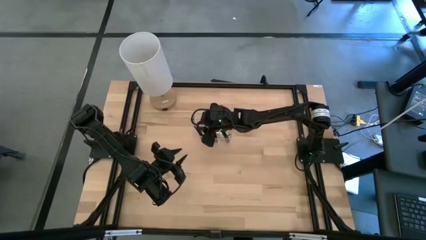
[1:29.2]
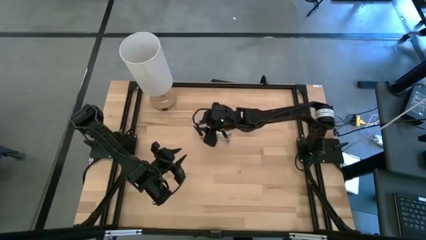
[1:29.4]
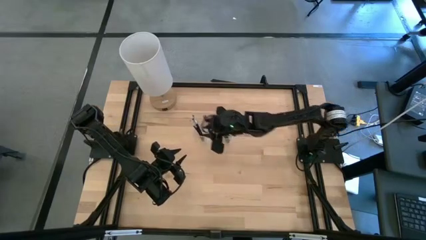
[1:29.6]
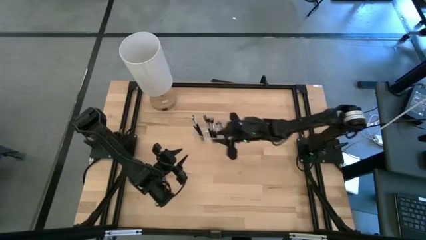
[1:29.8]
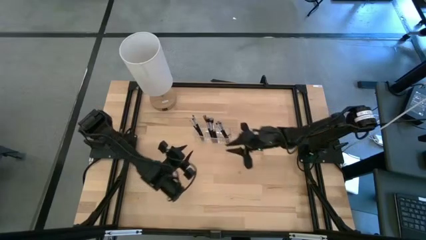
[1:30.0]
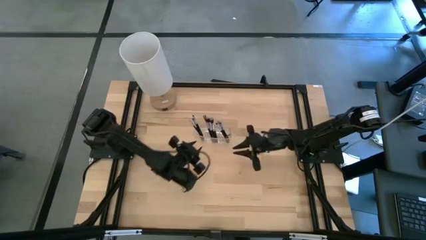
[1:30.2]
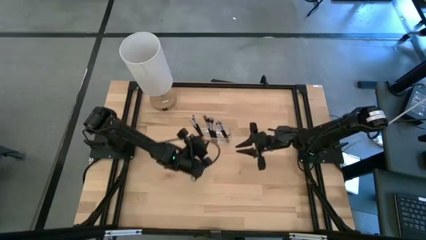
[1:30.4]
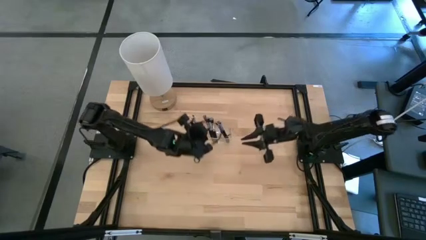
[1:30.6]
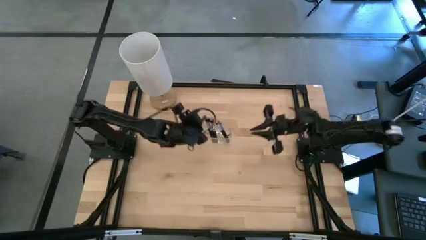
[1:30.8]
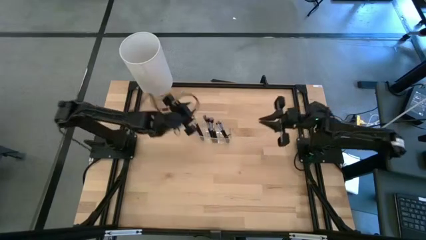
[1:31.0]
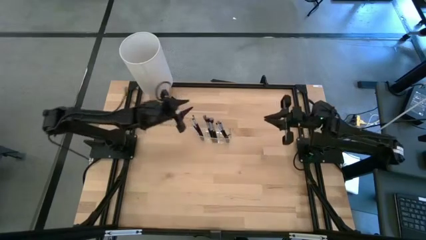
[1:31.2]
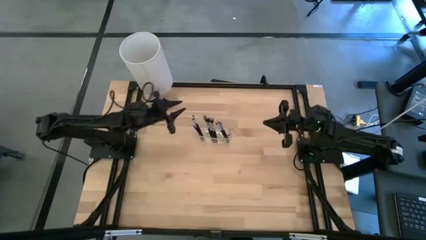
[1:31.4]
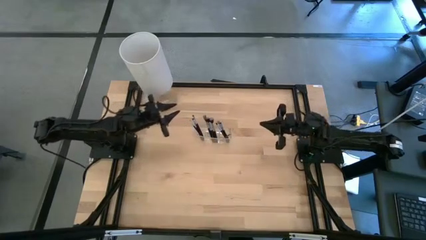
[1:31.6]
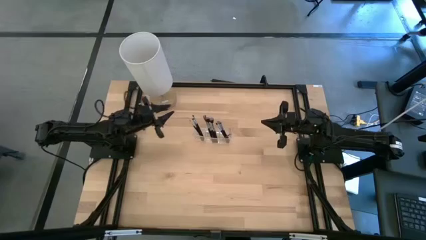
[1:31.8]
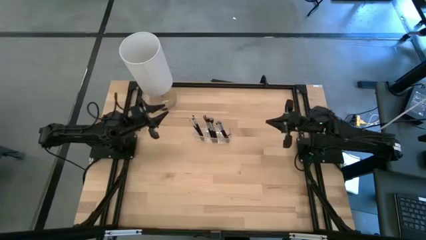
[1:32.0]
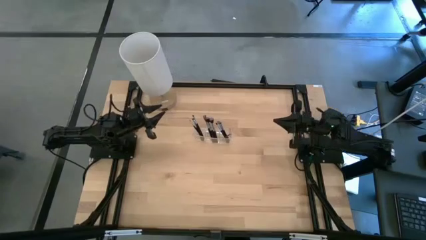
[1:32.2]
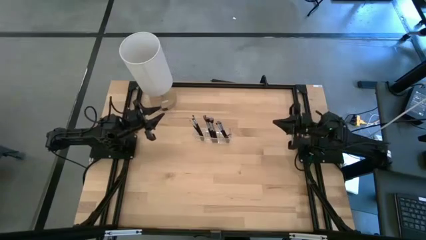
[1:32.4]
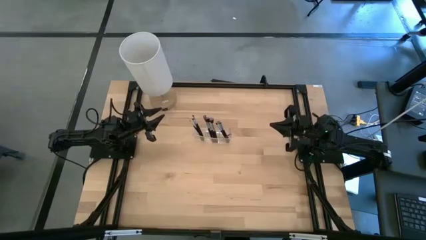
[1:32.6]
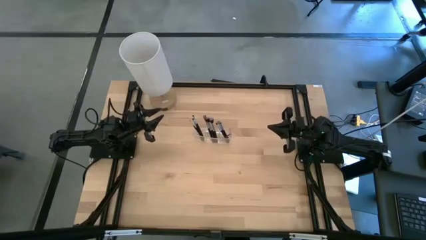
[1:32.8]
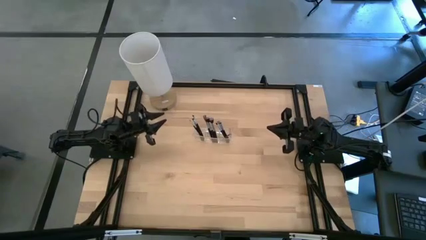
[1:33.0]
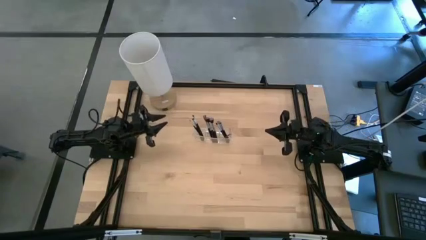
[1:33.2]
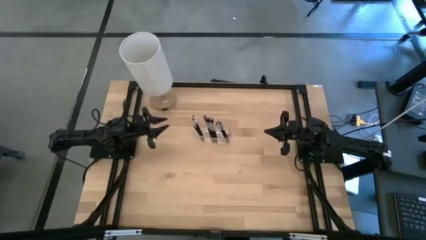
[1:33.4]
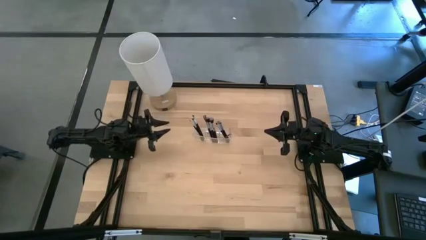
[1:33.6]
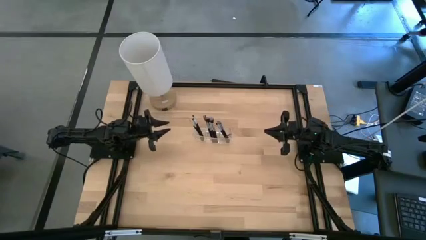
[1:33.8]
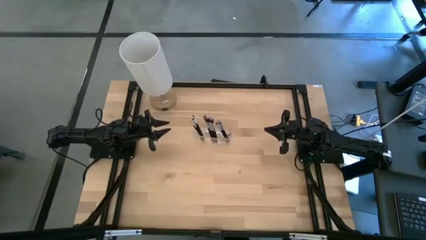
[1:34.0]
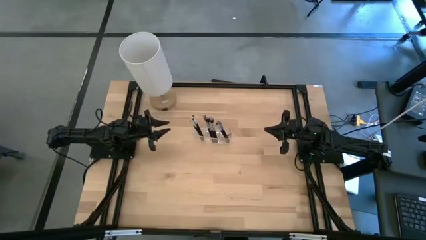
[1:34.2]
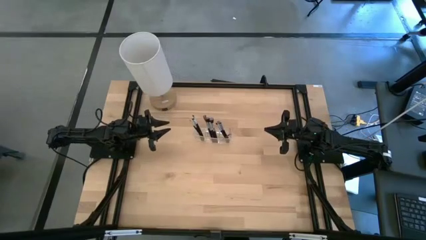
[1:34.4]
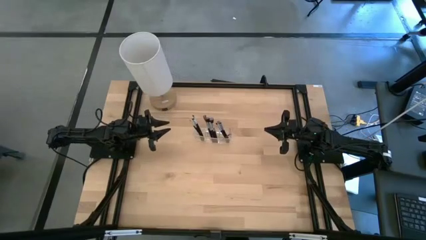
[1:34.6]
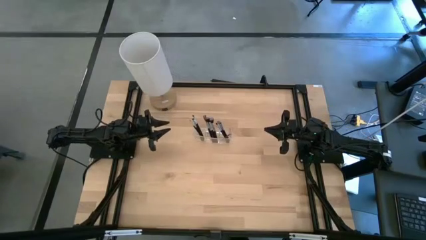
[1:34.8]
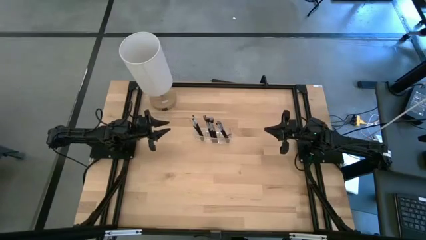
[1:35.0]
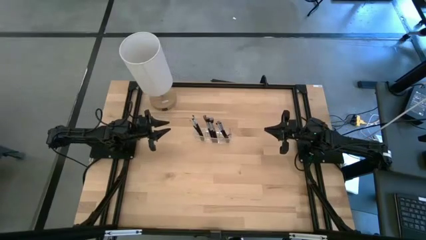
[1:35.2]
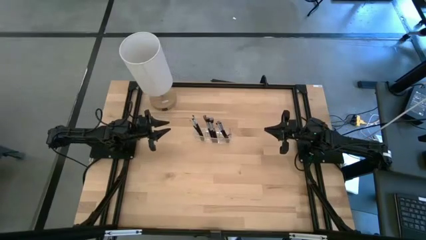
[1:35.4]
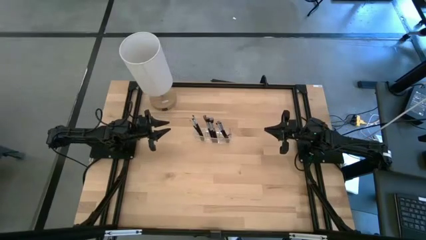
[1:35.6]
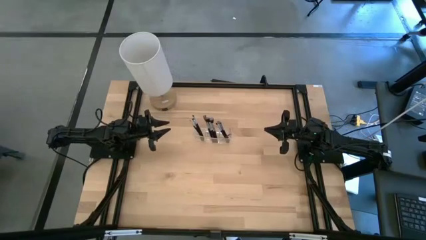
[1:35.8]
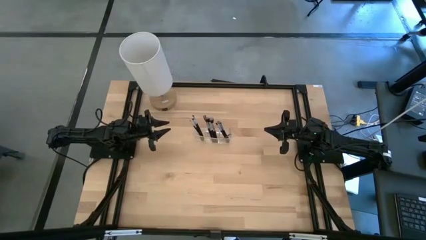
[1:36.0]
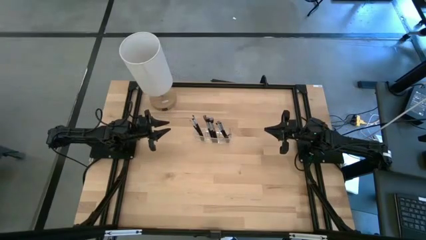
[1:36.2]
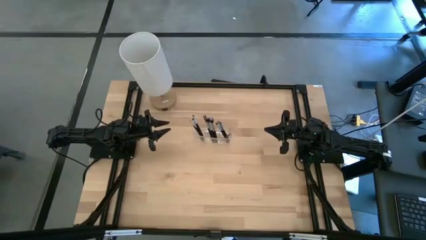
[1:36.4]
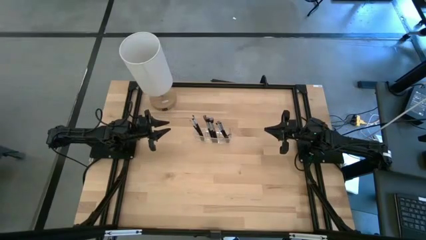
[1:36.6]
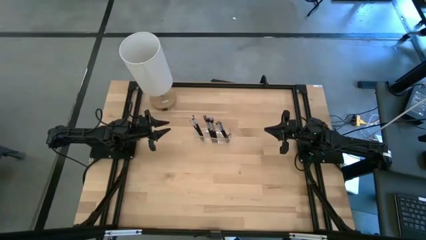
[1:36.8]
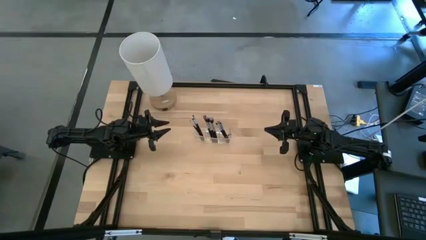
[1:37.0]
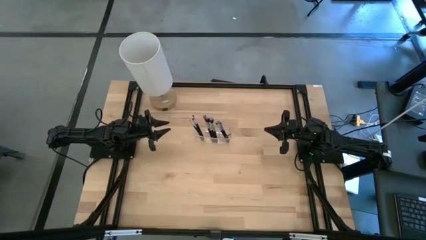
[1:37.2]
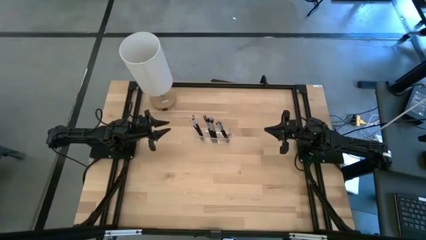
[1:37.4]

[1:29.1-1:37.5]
Task: Put items in baskets/containers
Return to Home Position

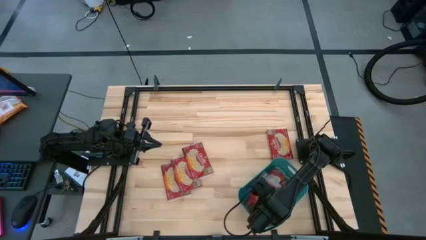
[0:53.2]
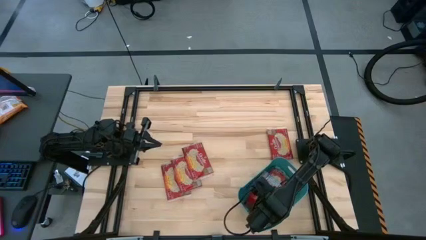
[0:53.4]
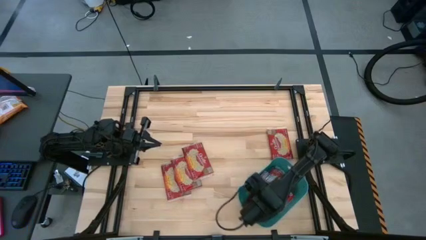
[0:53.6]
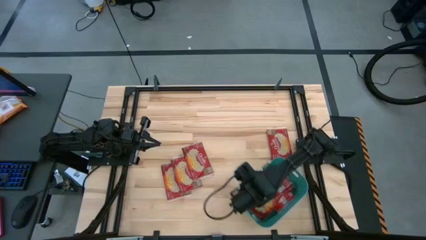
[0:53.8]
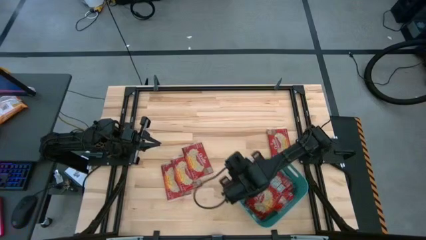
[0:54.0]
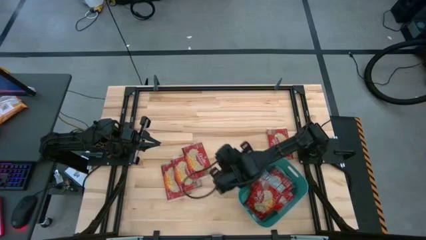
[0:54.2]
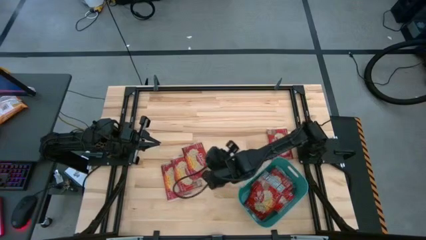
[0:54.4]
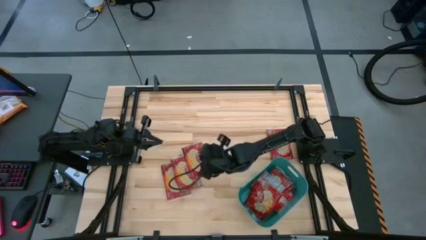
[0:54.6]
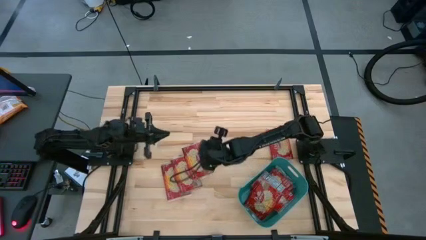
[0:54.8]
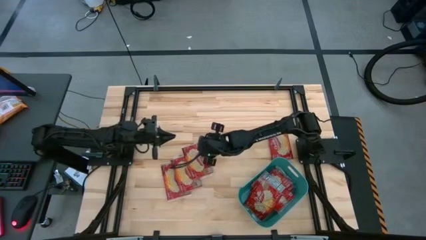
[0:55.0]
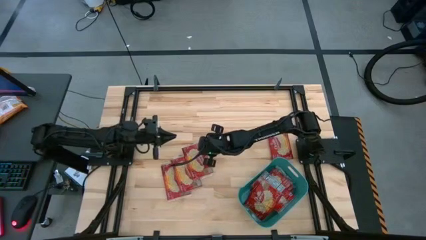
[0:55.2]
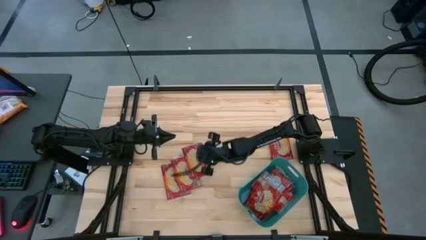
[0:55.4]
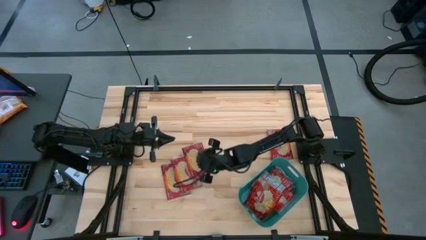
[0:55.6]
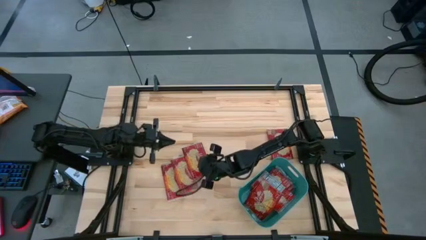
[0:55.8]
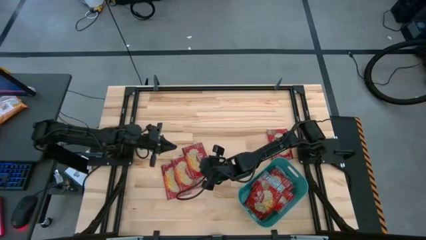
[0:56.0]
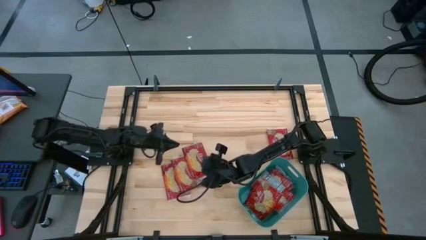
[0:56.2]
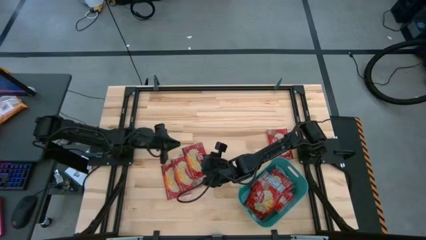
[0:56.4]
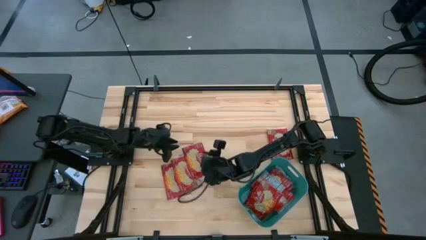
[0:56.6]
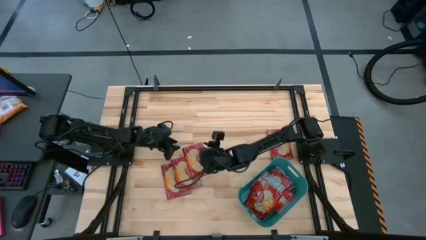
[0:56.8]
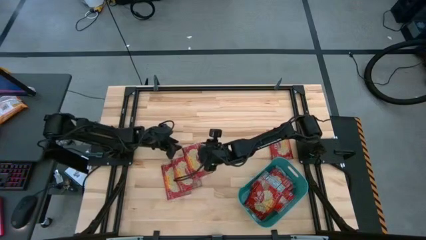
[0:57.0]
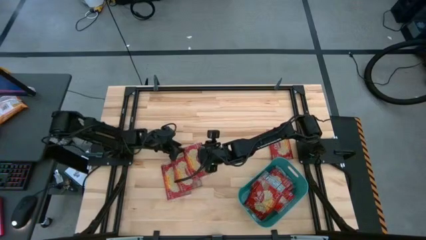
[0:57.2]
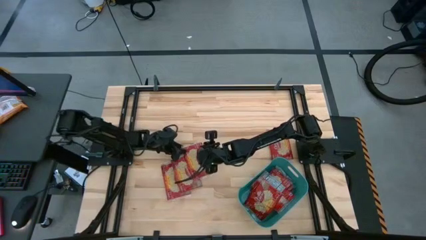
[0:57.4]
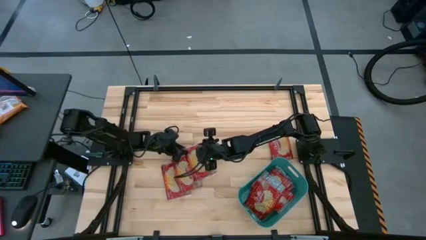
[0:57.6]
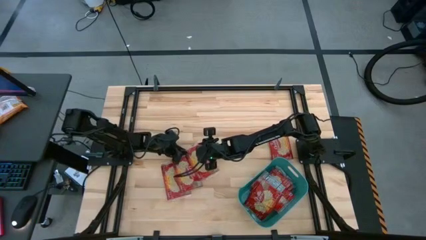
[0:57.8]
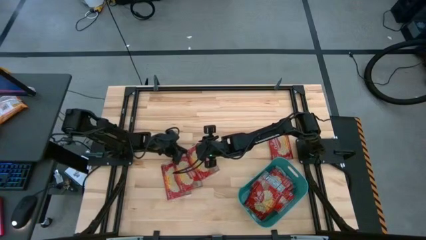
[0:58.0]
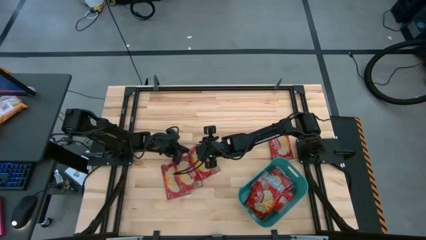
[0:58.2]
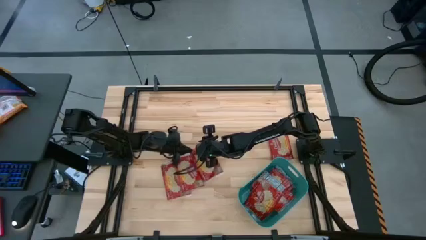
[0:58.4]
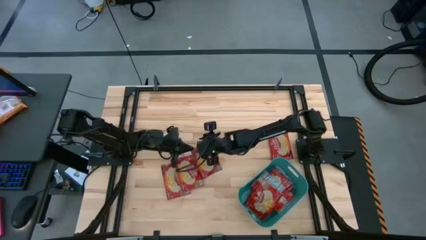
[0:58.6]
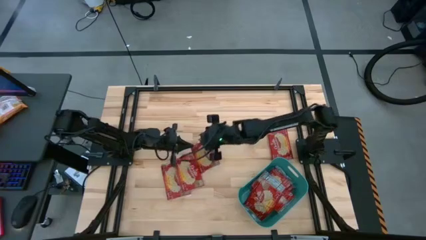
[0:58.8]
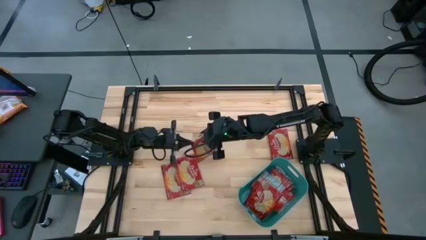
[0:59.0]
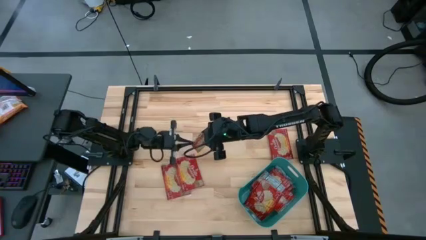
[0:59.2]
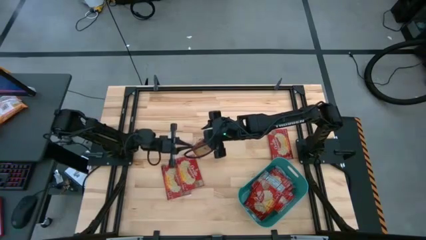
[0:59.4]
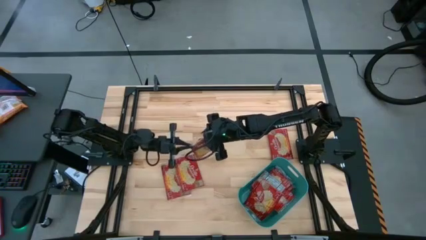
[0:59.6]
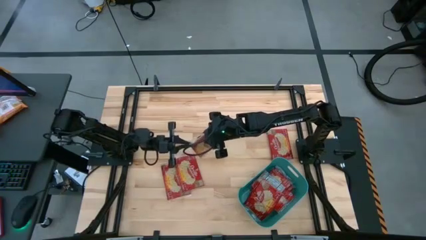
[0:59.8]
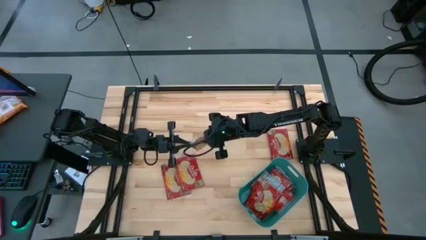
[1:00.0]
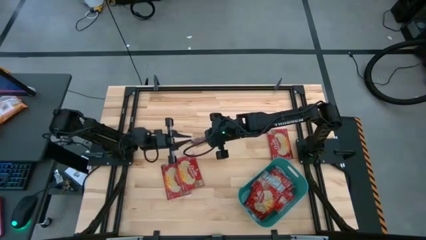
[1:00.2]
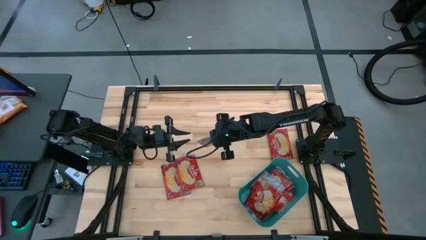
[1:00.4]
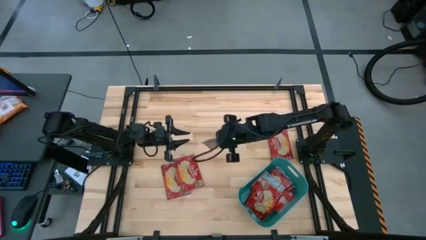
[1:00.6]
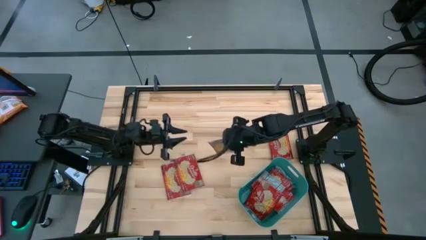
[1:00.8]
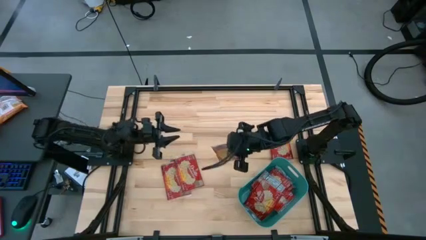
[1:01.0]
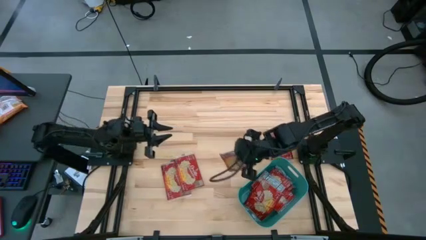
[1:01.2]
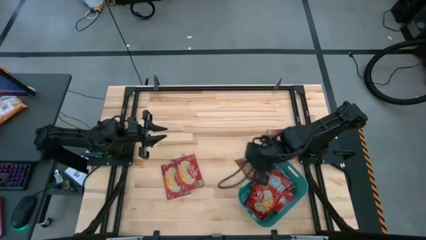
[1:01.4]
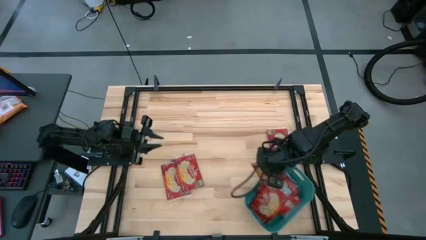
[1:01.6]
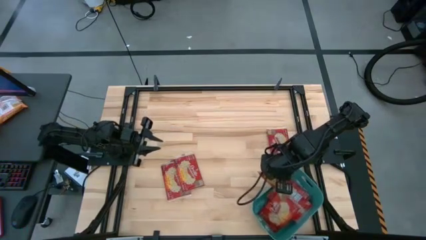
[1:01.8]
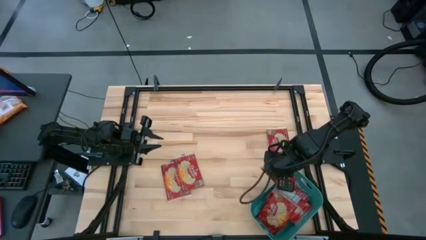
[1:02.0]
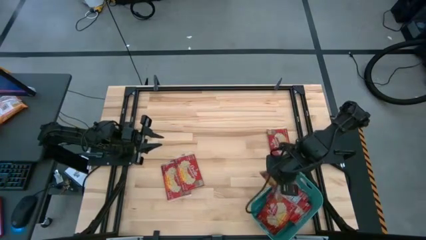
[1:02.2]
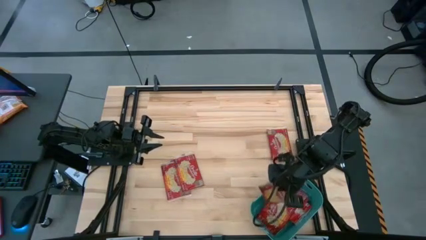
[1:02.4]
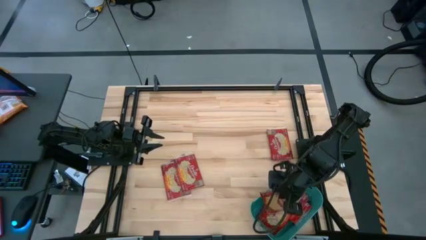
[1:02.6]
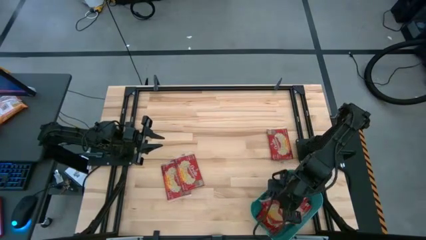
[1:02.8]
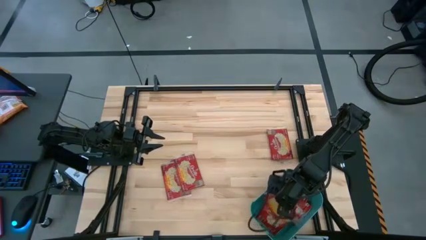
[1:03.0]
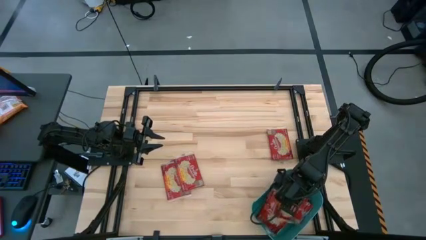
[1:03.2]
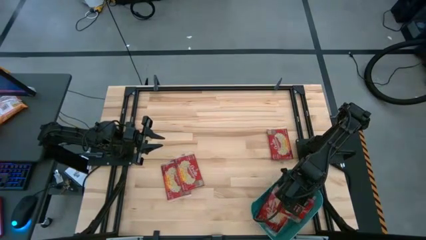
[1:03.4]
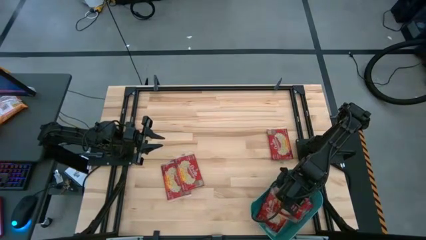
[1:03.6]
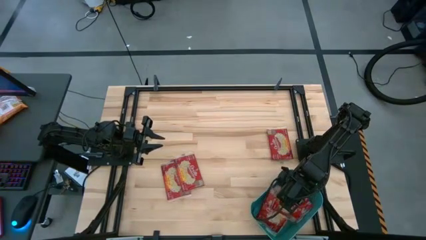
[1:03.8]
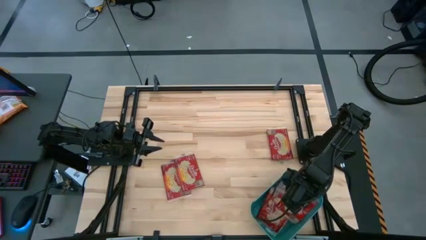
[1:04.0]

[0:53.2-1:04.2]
Task: Sort popcorn bags into baskets
Put the red popcorn into the green bin
